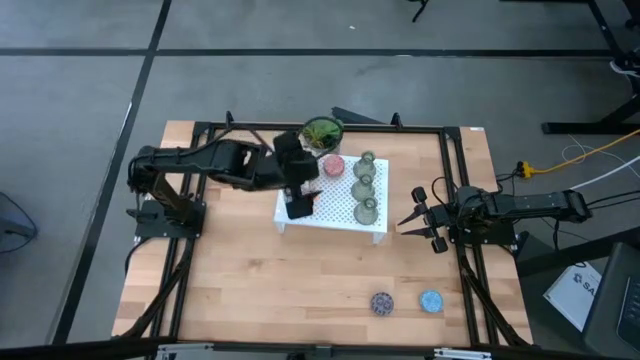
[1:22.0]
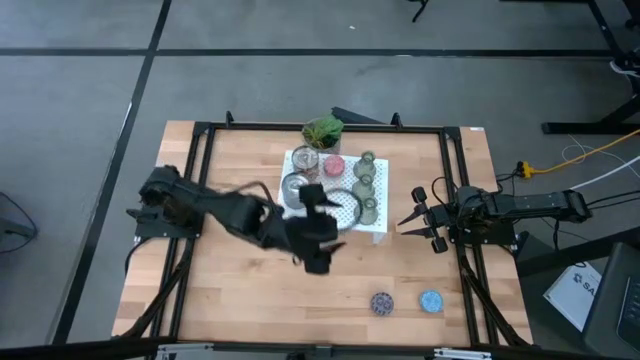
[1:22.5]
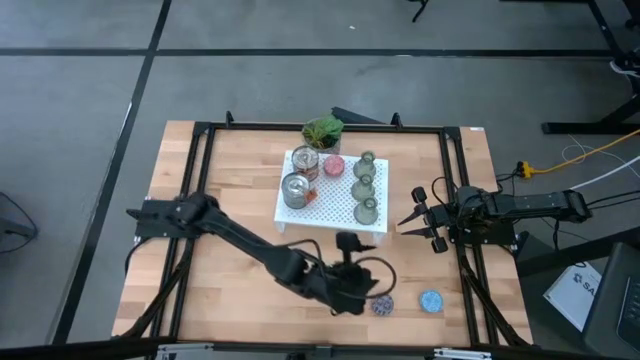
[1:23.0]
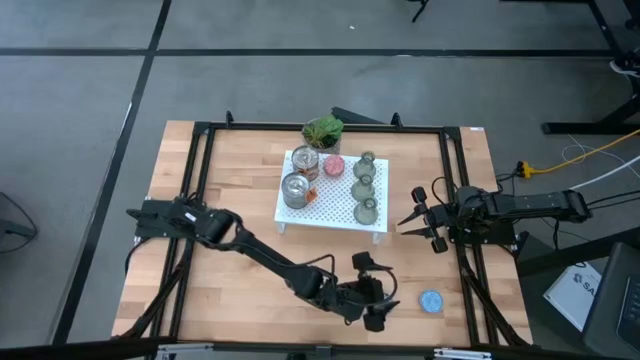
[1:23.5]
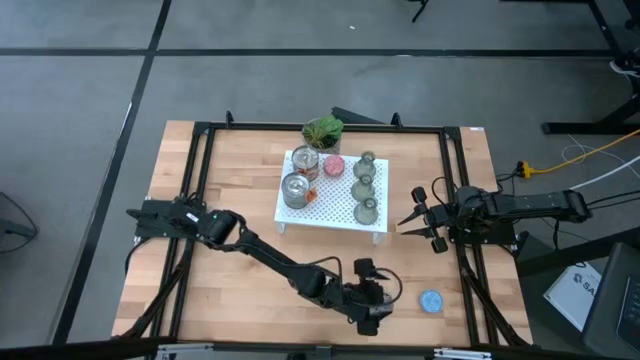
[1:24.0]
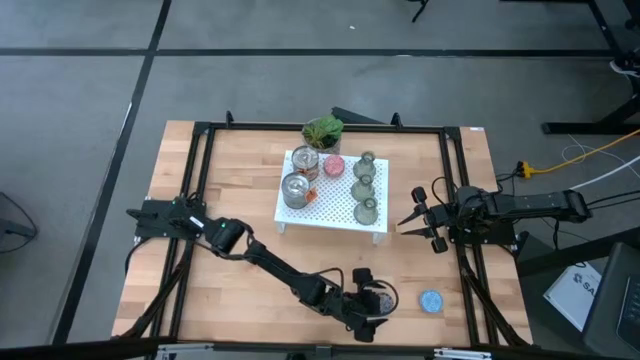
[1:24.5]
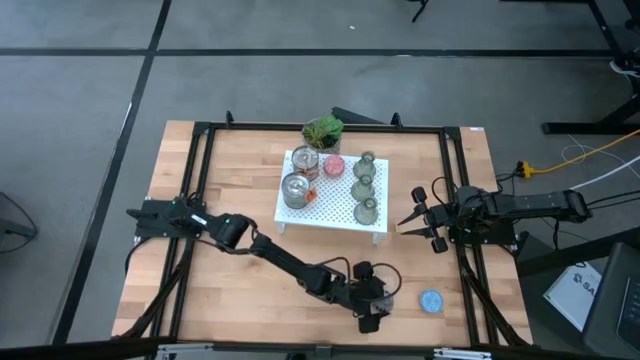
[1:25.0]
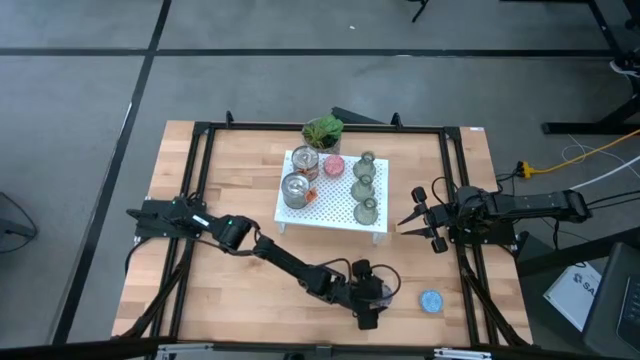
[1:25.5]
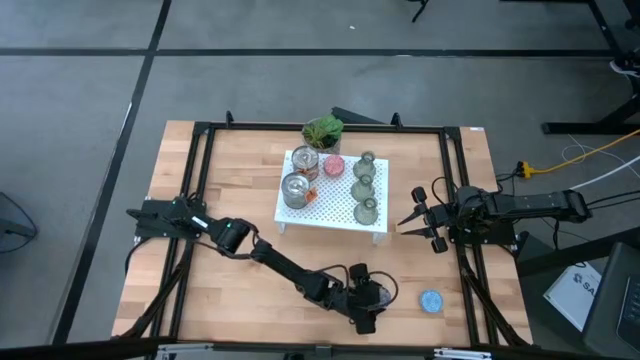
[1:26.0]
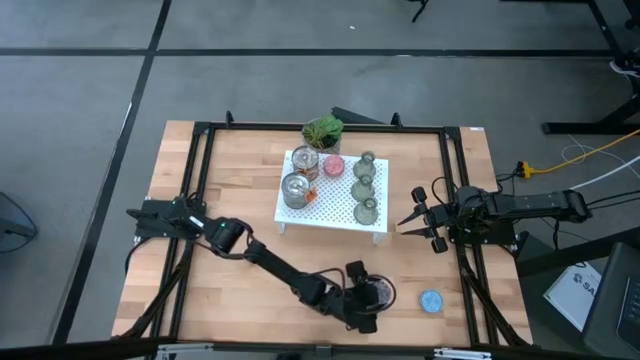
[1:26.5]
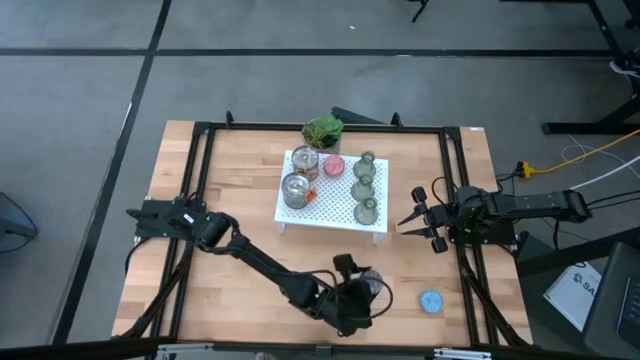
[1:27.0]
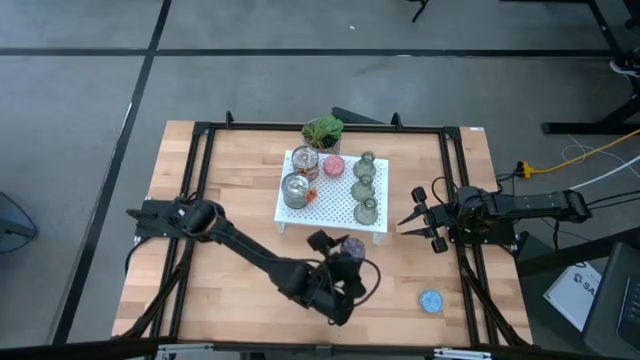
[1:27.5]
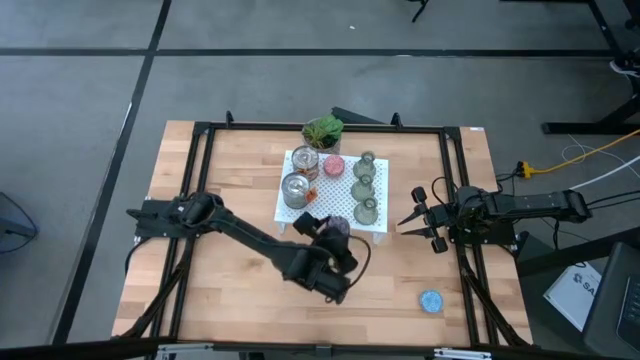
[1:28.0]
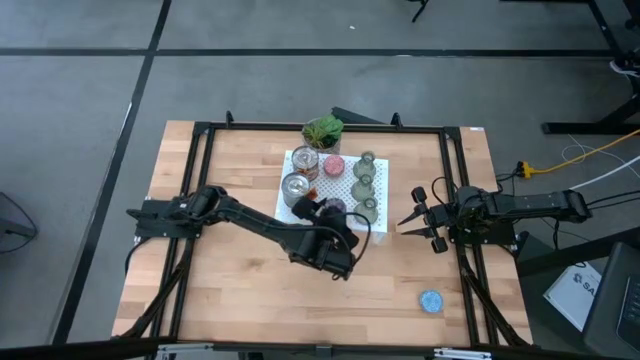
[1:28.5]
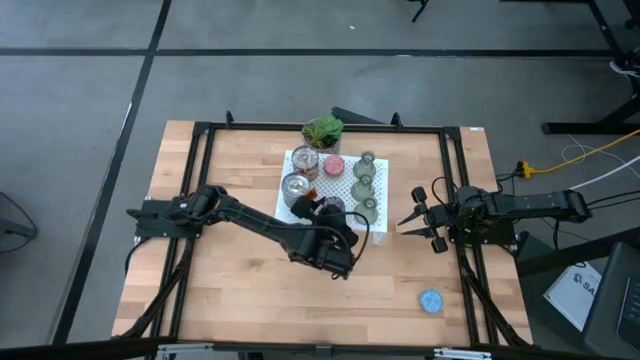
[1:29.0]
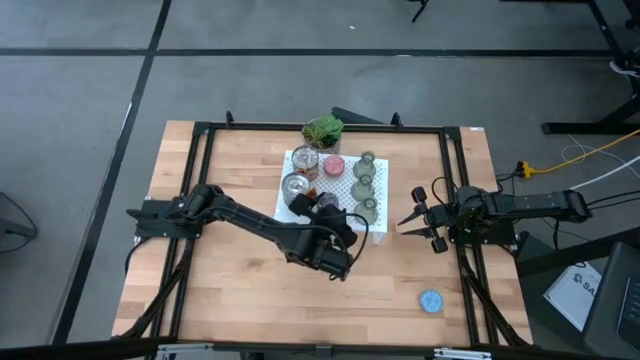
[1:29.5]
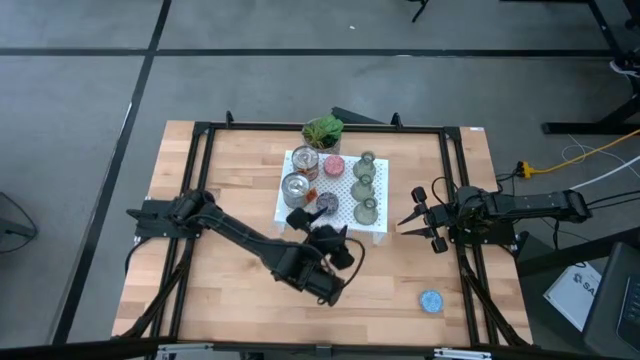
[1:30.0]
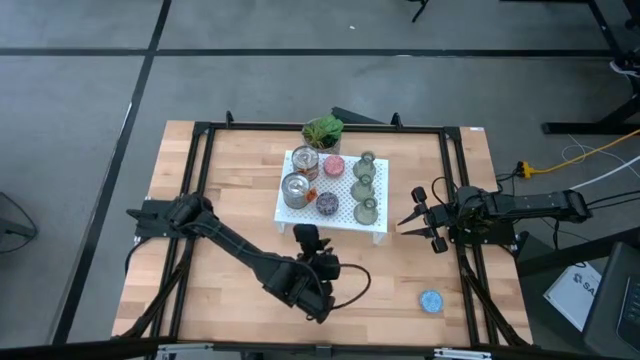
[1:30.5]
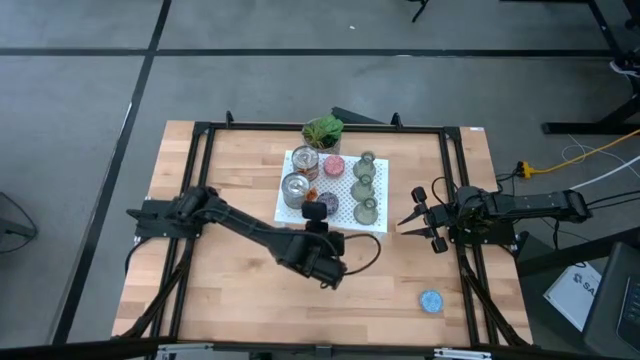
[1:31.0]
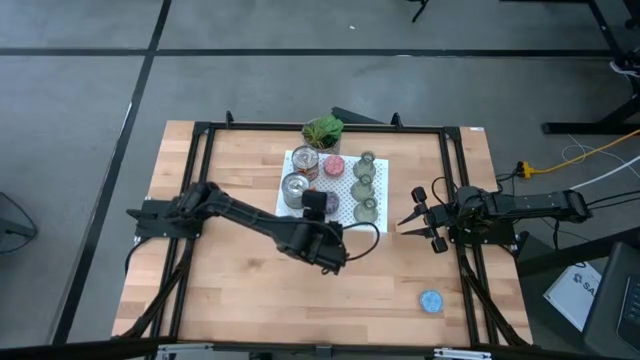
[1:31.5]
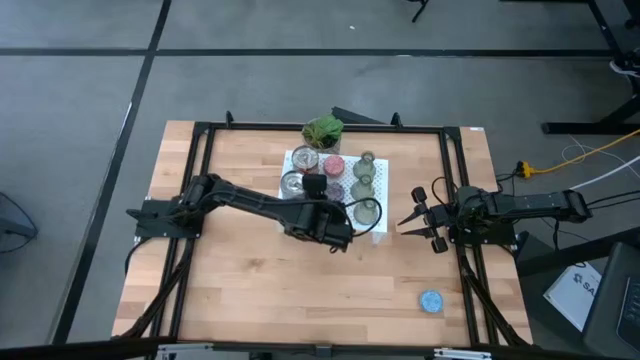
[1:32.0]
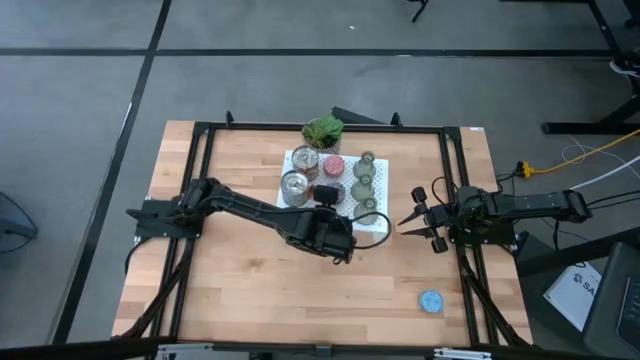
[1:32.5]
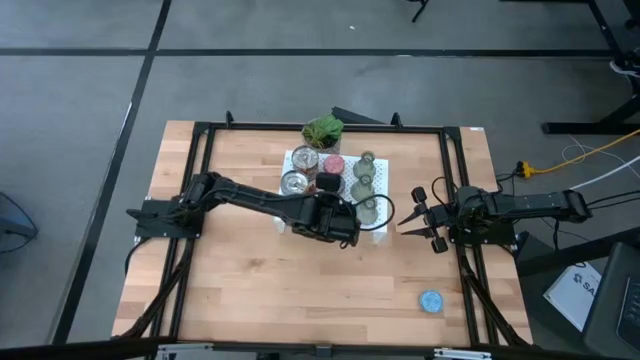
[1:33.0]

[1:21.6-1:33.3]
Task: Stock candles and vases on shelf
Align the black patterned scented candle with the other scented candle on the shelf

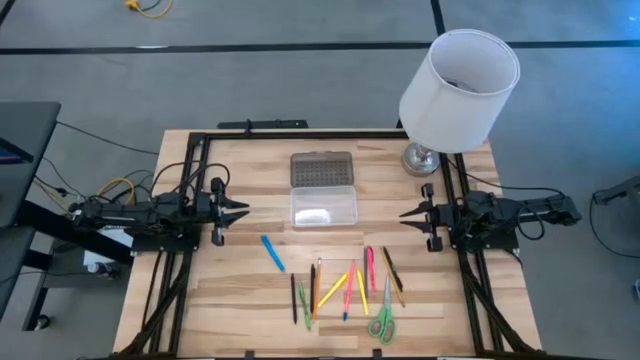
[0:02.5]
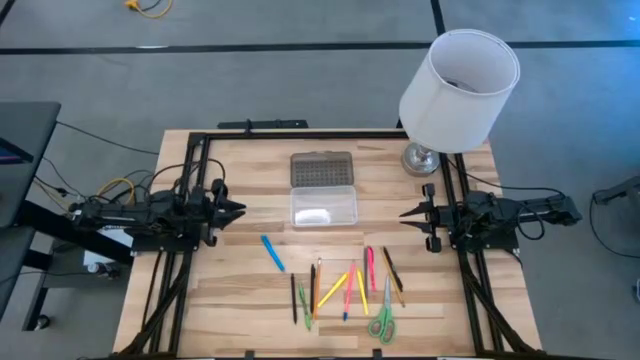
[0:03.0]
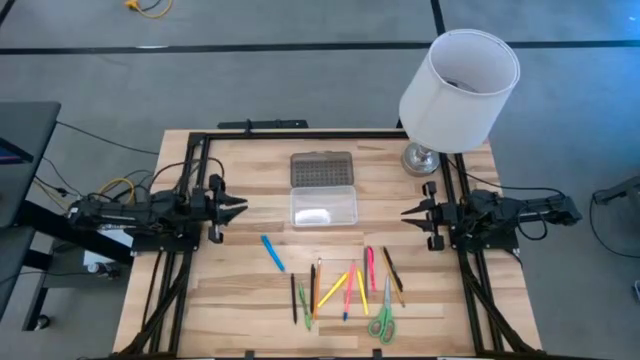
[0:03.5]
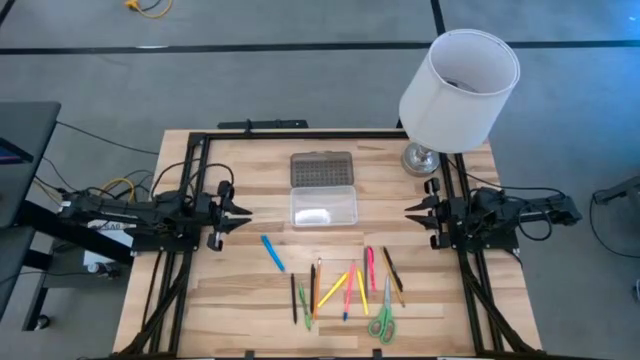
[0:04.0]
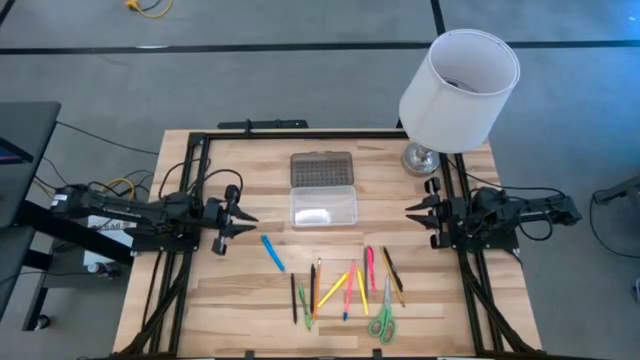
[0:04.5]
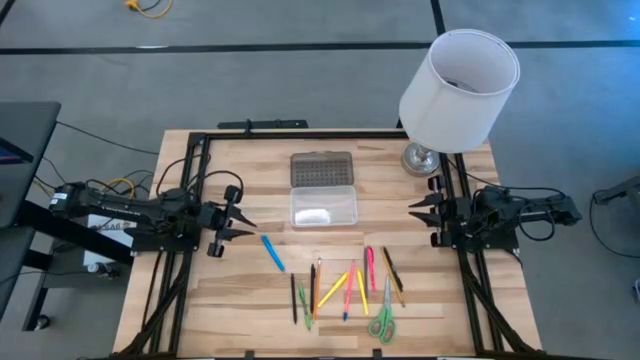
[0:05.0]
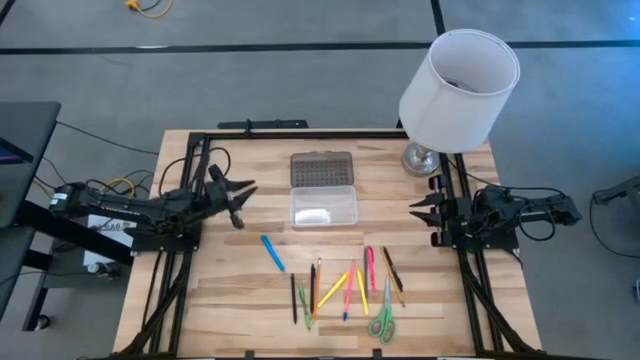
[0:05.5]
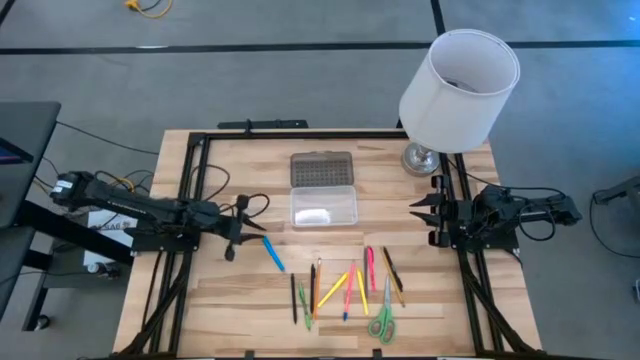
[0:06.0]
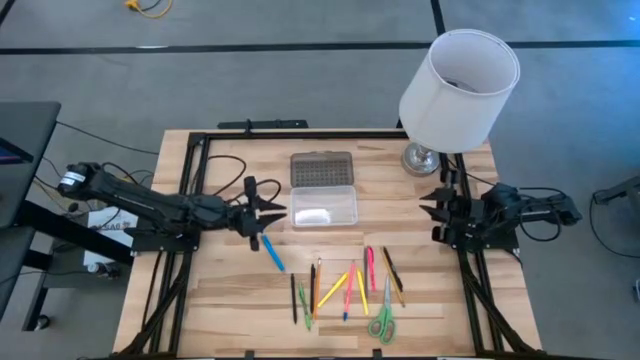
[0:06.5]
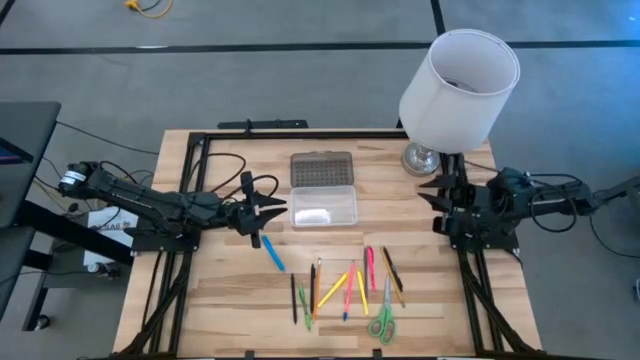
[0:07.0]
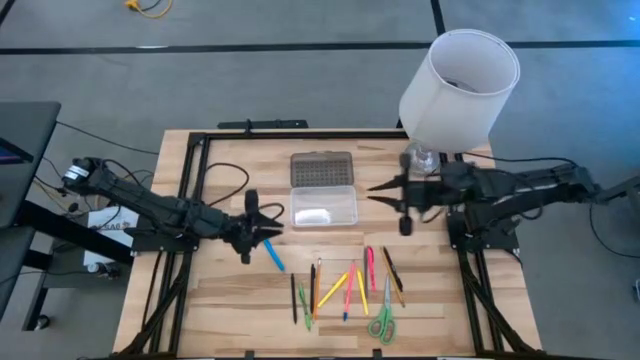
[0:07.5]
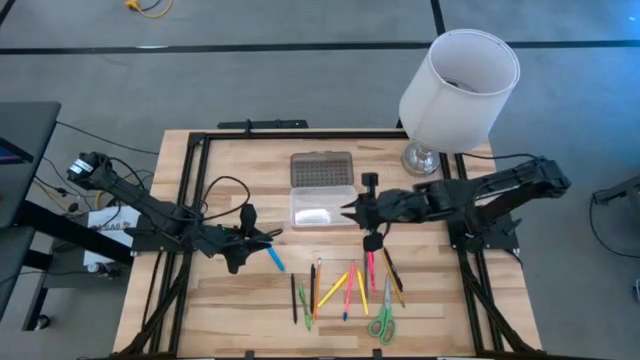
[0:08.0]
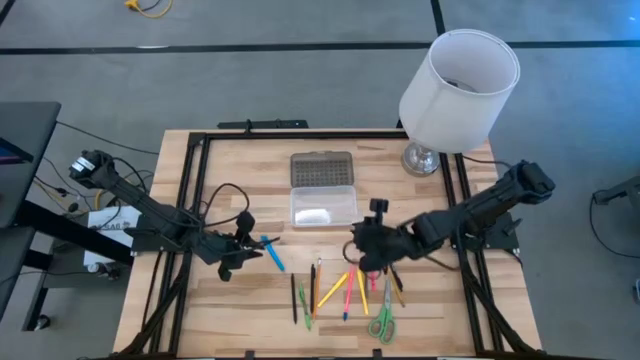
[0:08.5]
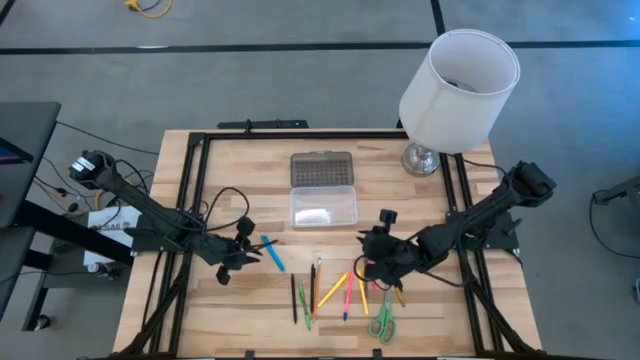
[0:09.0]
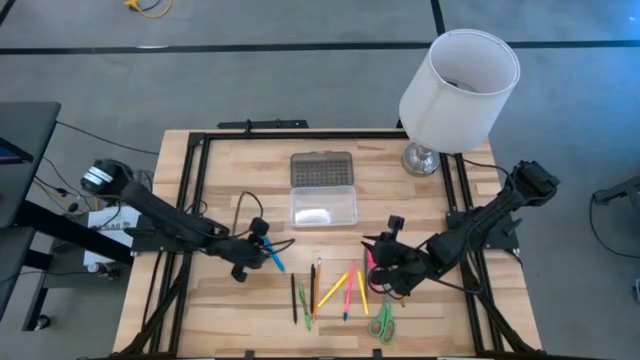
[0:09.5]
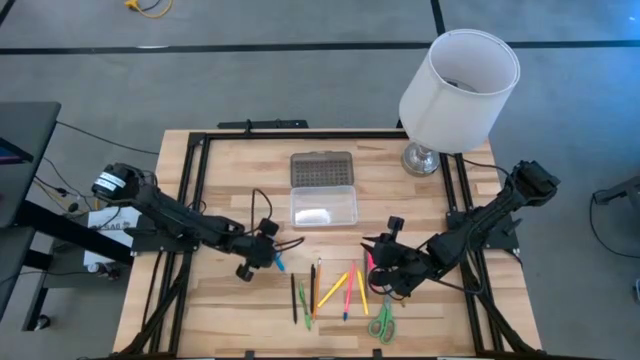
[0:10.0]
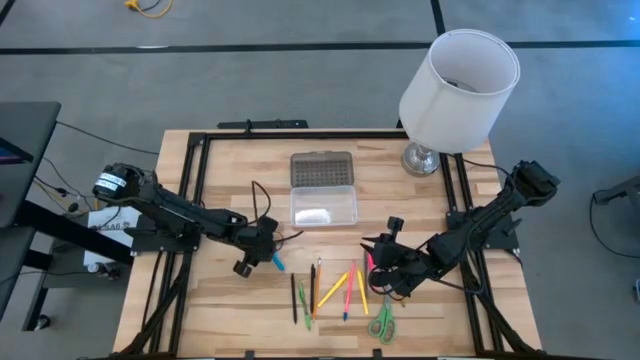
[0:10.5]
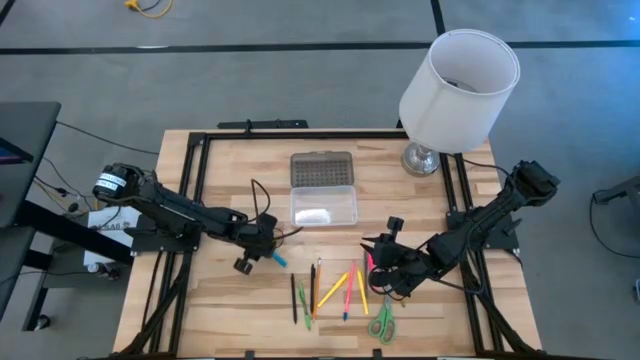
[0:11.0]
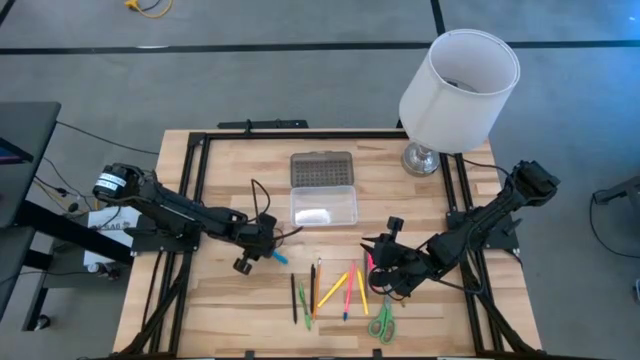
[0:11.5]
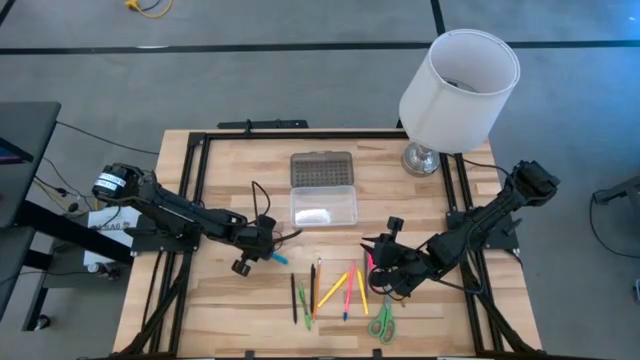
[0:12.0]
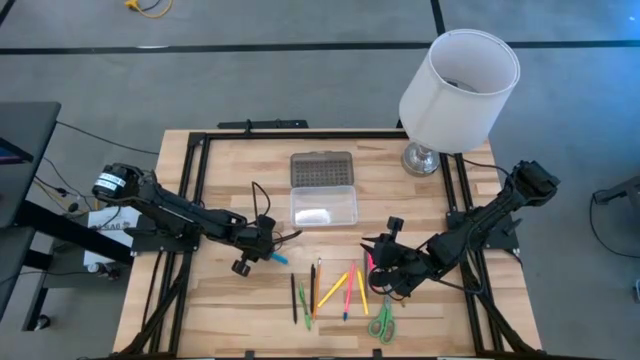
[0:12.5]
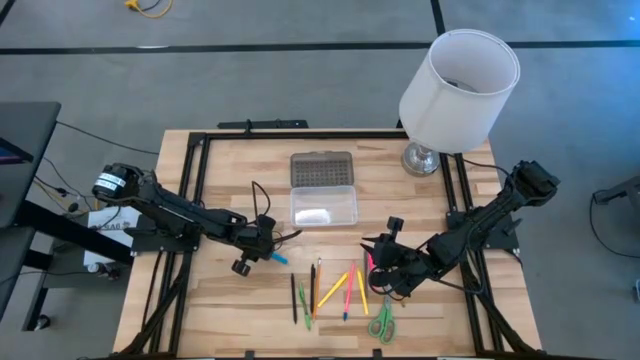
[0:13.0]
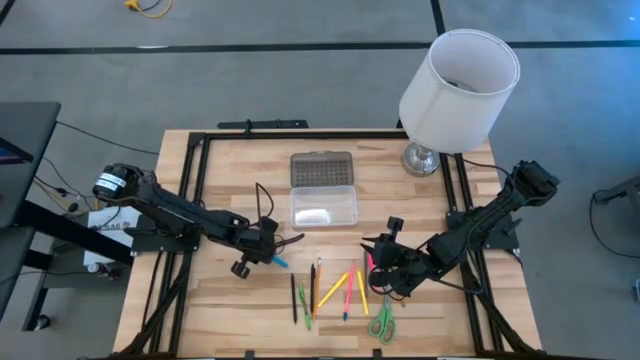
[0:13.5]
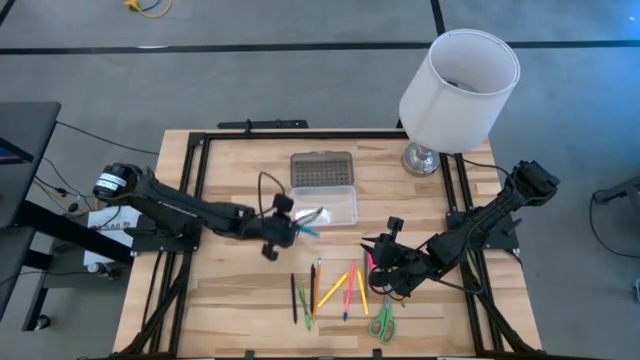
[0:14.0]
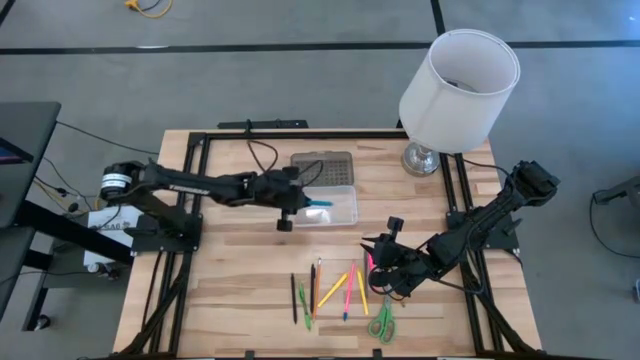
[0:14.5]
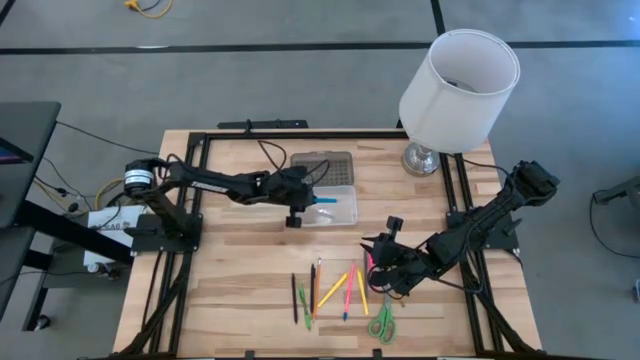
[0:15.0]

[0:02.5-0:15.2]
Task: Pick & place school supplies into a supply box
Put the blue pen into the gray supply box
